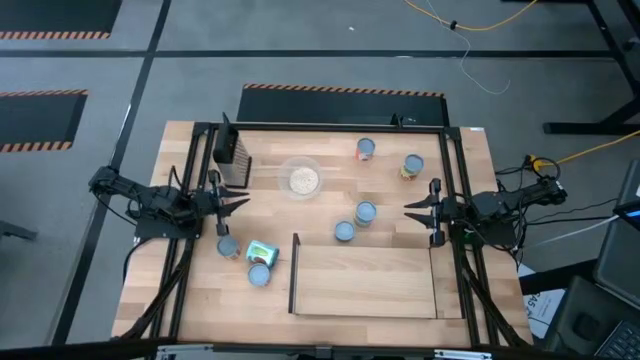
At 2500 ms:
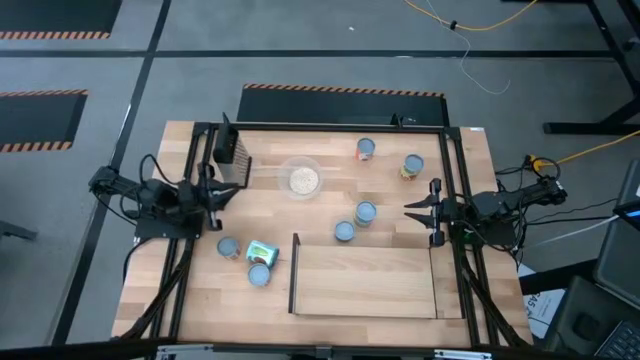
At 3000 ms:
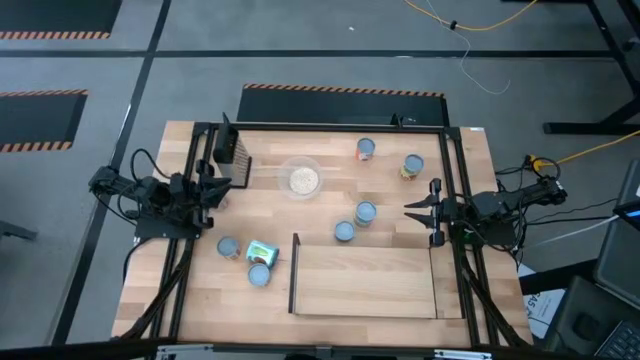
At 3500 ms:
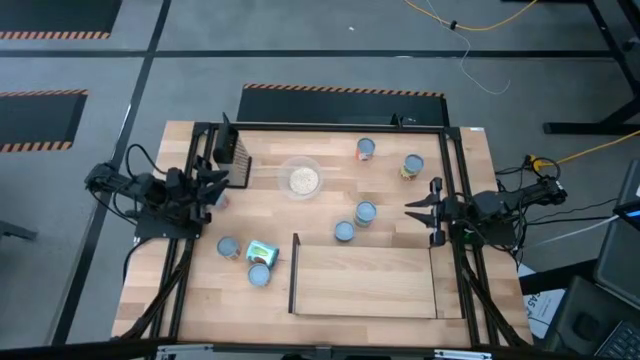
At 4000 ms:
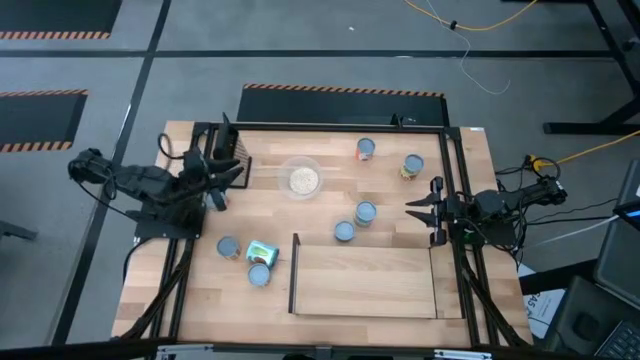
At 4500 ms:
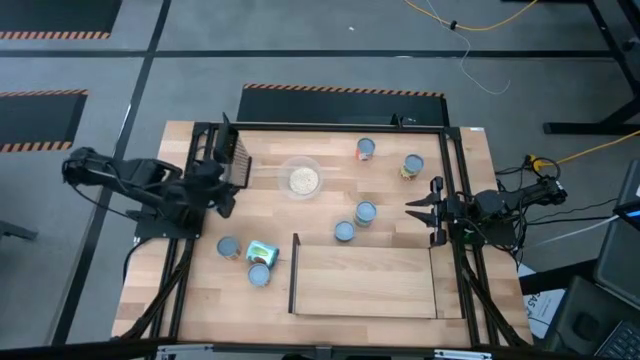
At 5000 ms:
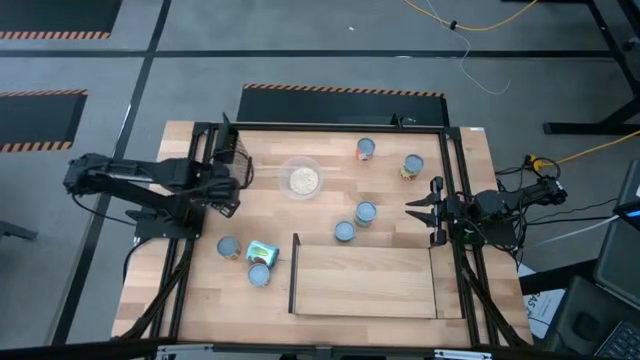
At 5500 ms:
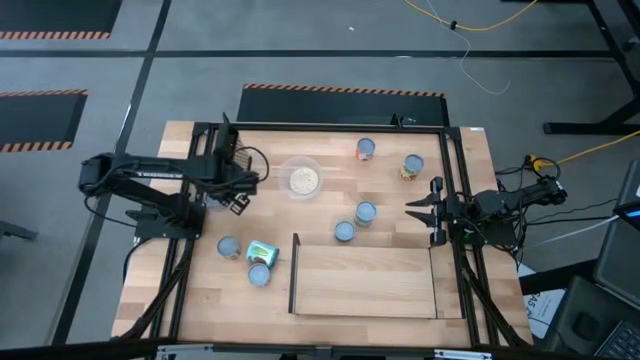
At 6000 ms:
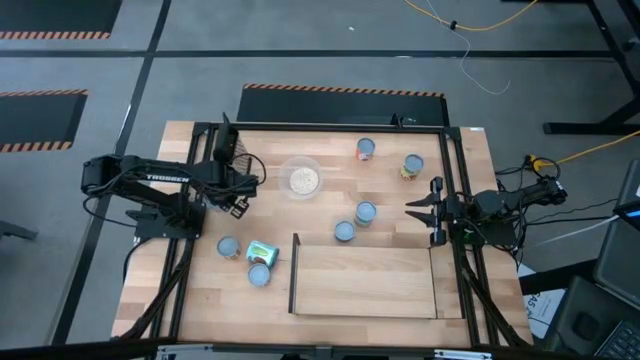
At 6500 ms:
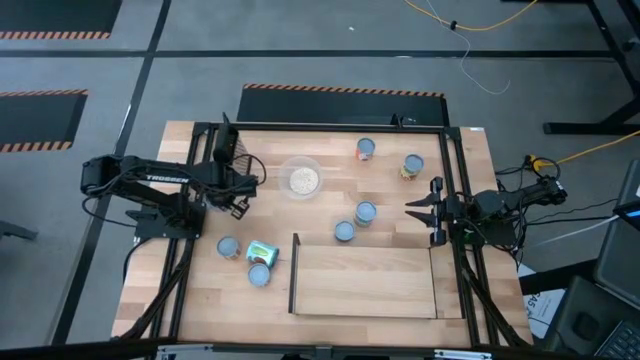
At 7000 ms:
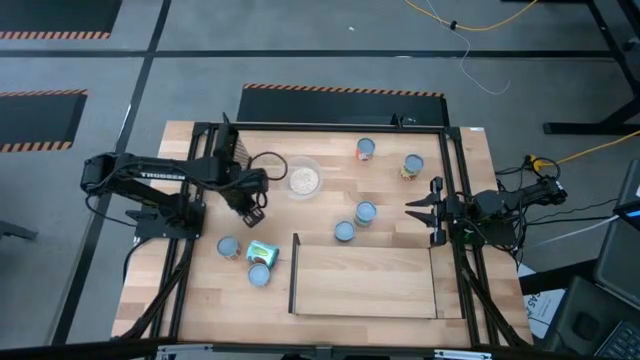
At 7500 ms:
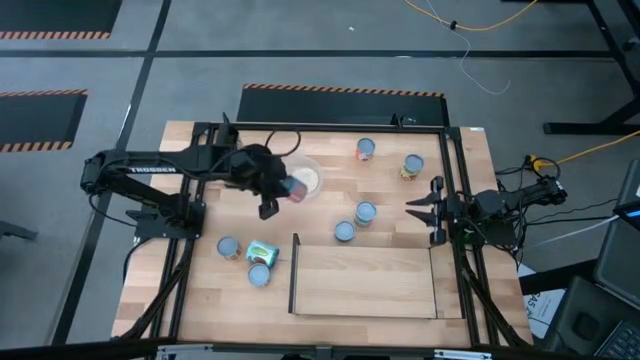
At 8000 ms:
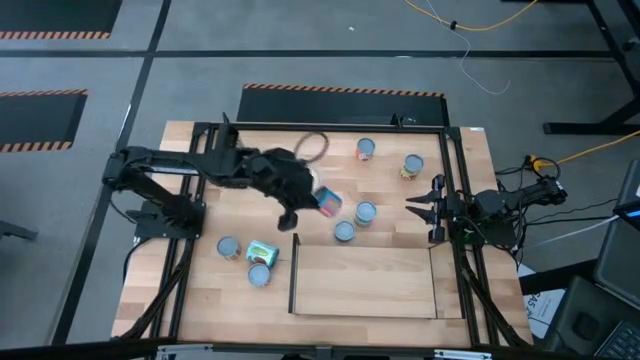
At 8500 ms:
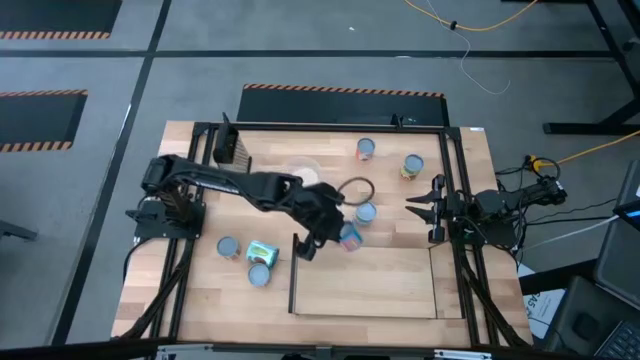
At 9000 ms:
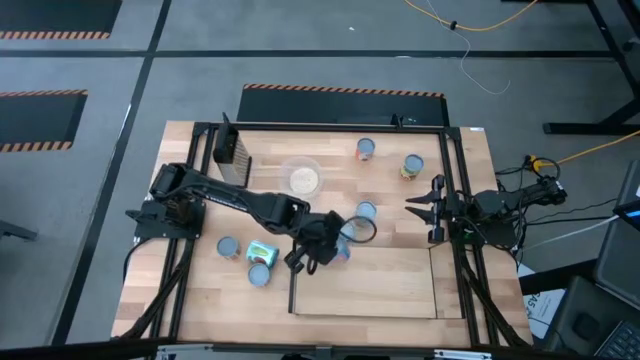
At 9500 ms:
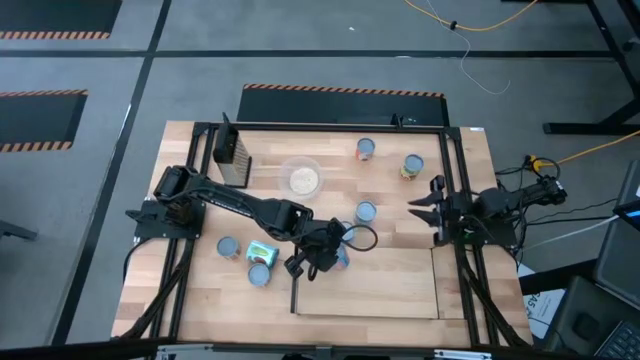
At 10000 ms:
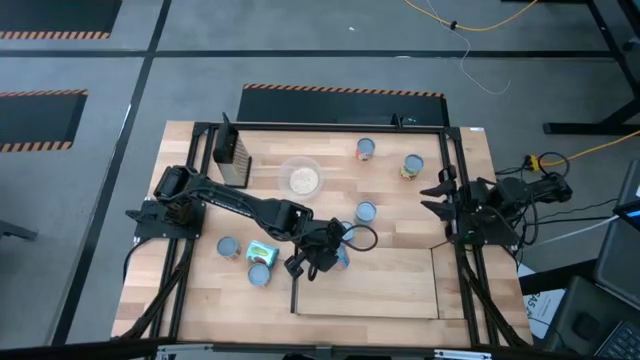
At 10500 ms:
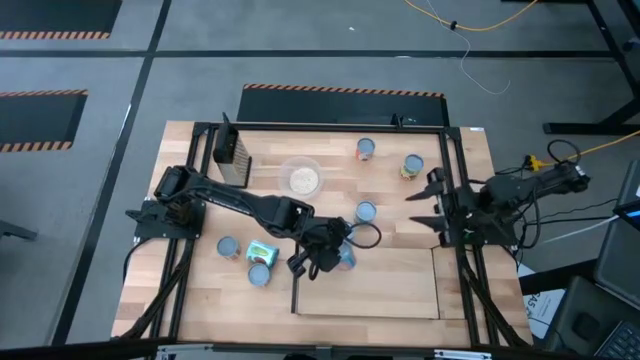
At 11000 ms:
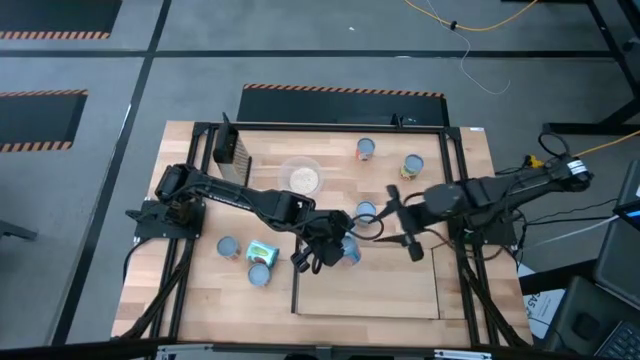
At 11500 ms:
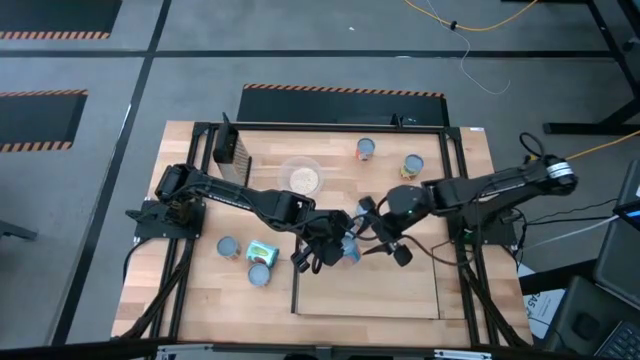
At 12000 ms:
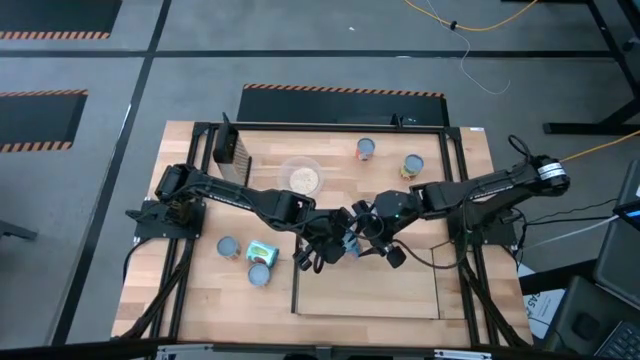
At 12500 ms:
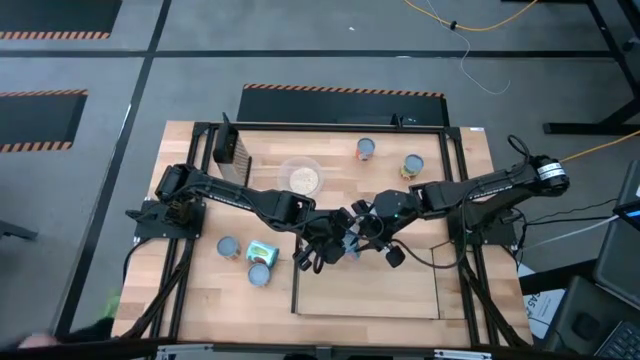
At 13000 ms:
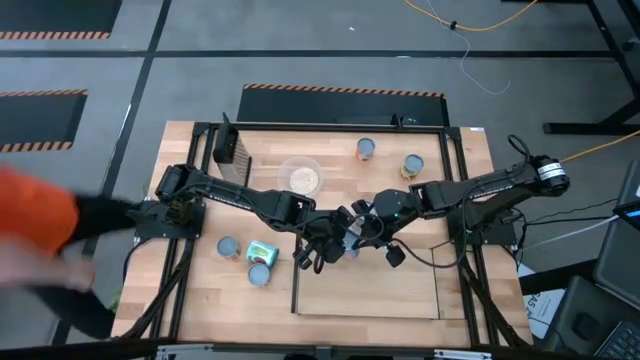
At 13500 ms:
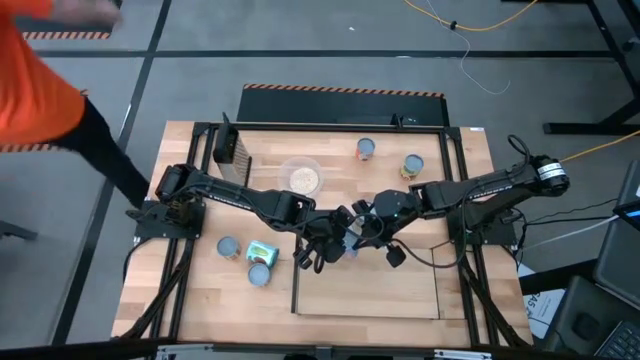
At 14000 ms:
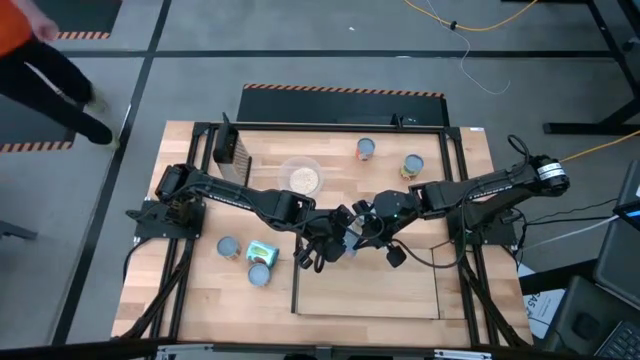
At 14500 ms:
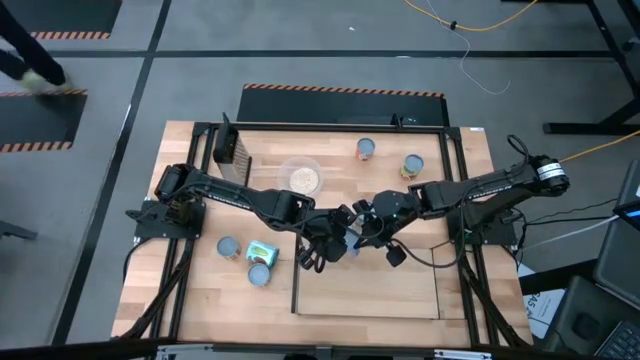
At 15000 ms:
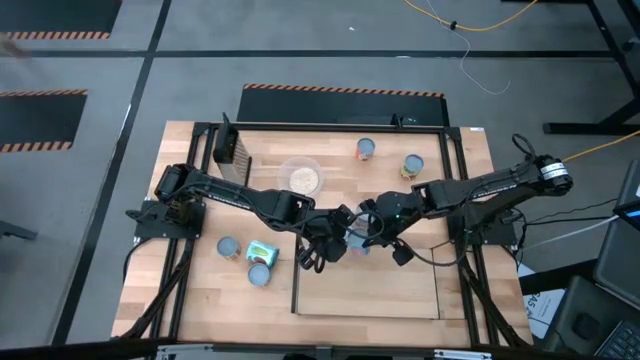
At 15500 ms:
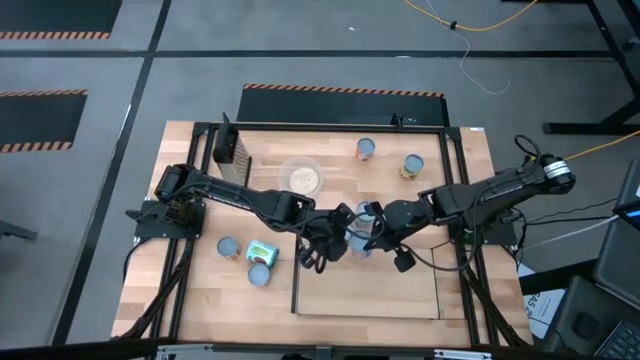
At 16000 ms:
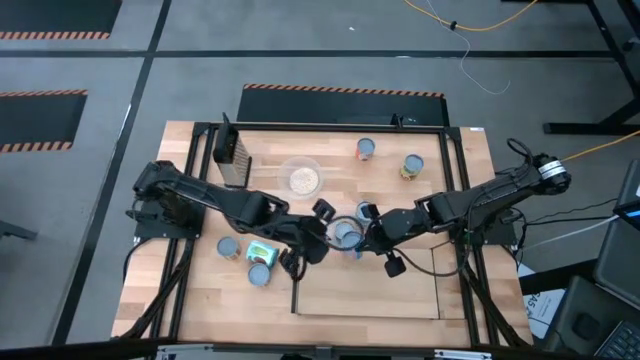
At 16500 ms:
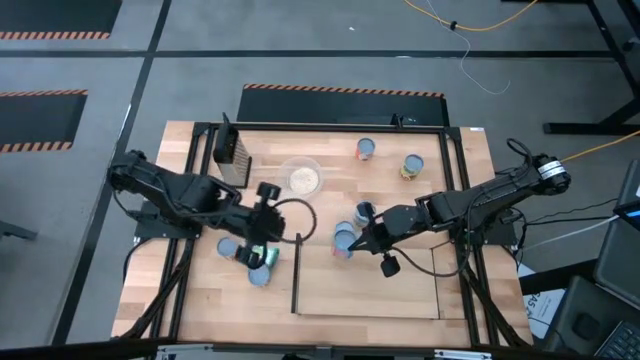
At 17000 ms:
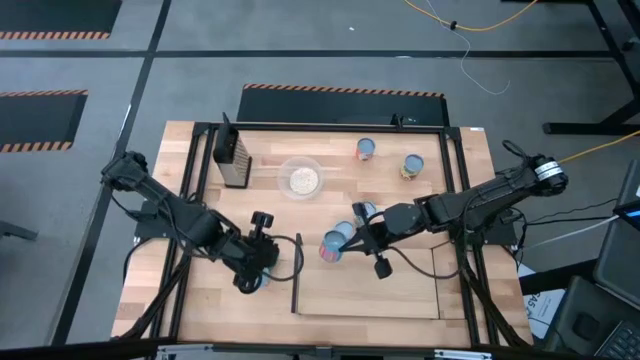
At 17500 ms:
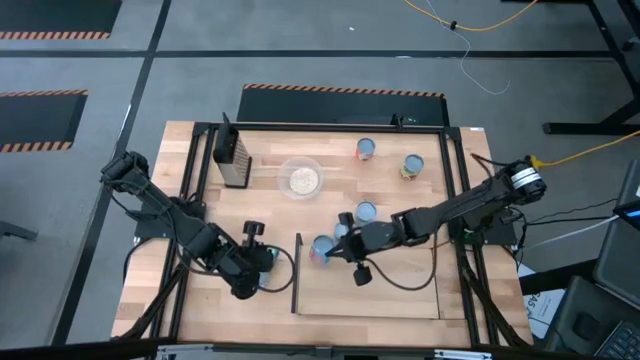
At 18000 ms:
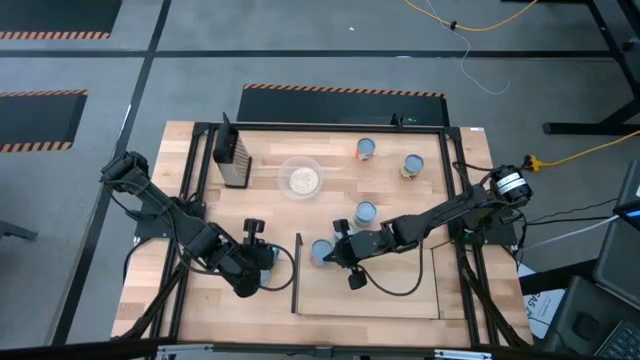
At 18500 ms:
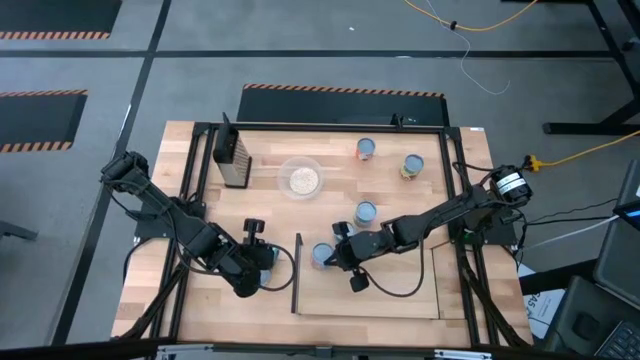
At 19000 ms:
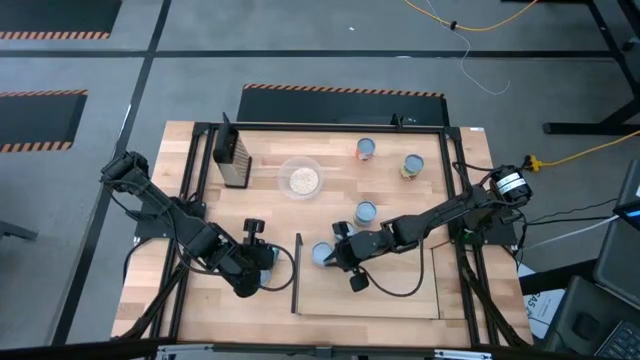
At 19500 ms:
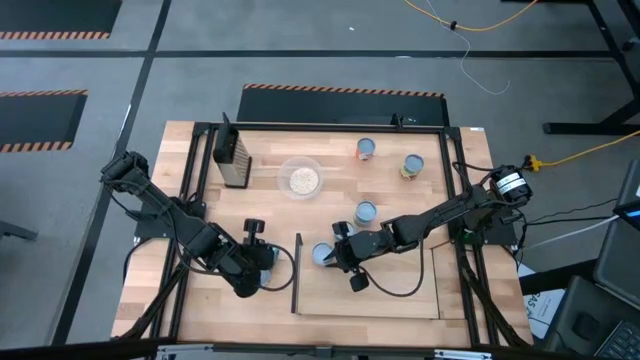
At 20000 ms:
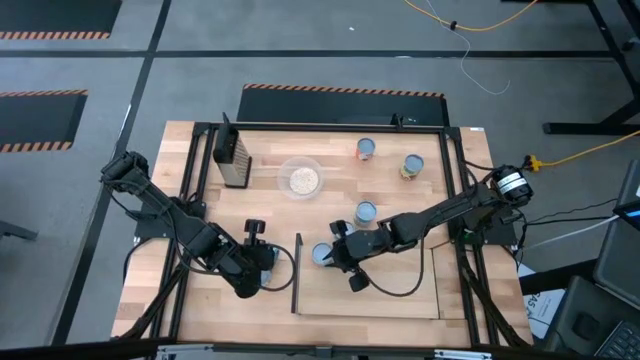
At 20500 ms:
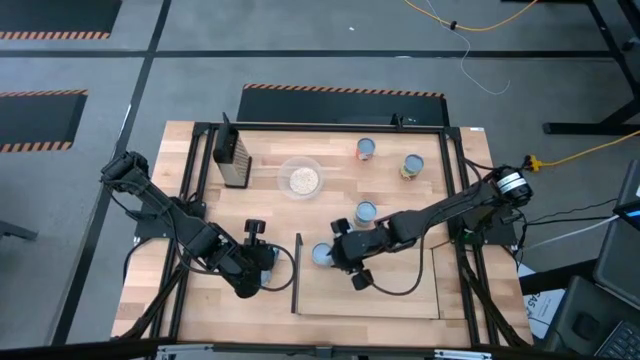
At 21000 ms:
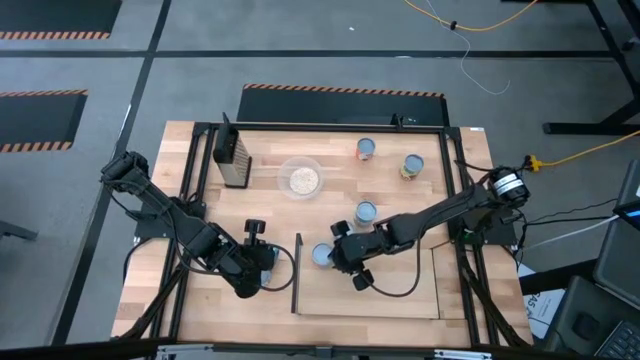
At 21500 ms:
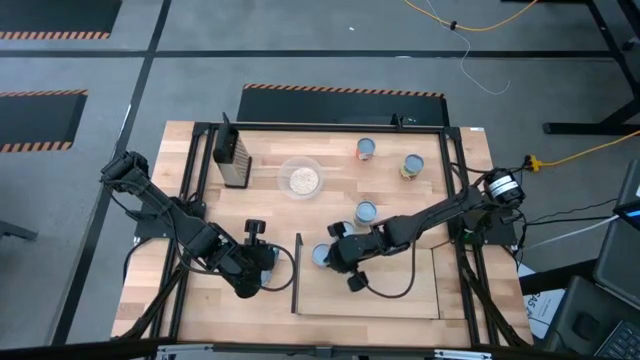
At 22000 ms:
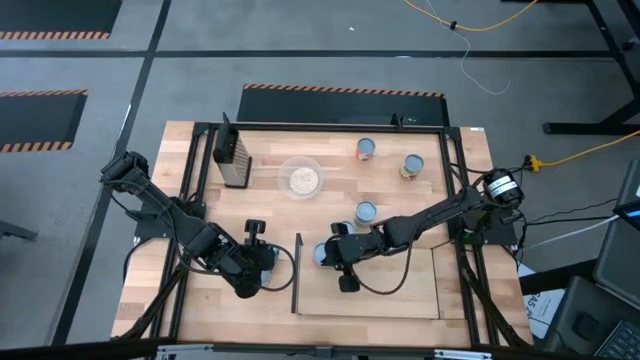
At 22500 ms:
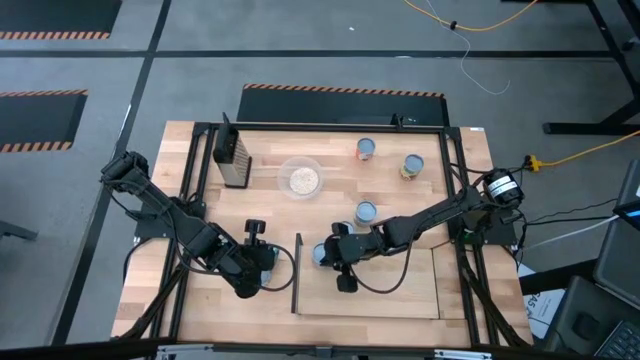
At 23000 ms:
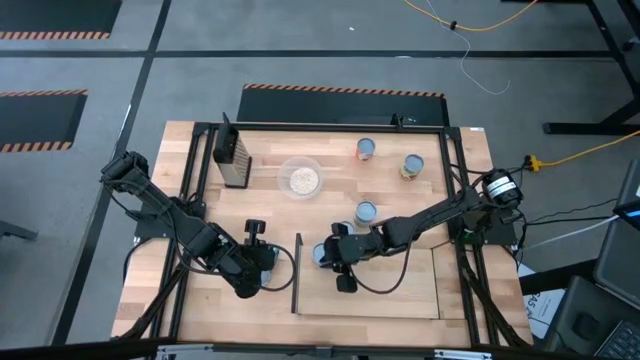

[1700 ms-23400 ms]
Task: Pick and place cans onto a shelf
Put the canned corn on the shelf
